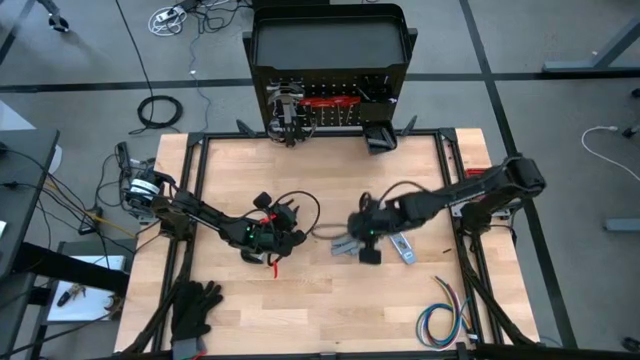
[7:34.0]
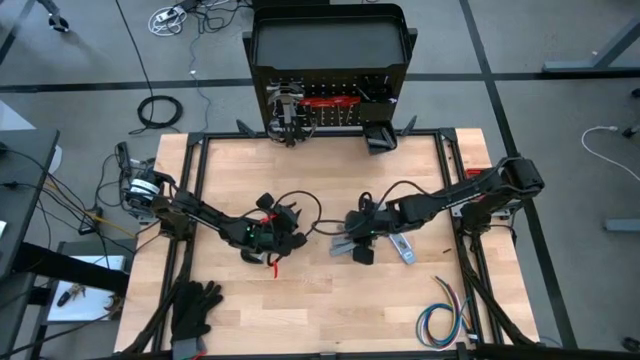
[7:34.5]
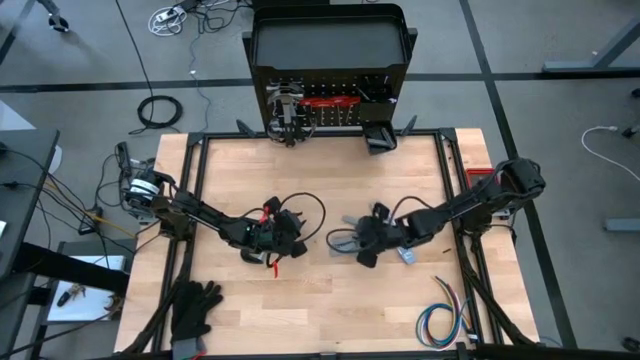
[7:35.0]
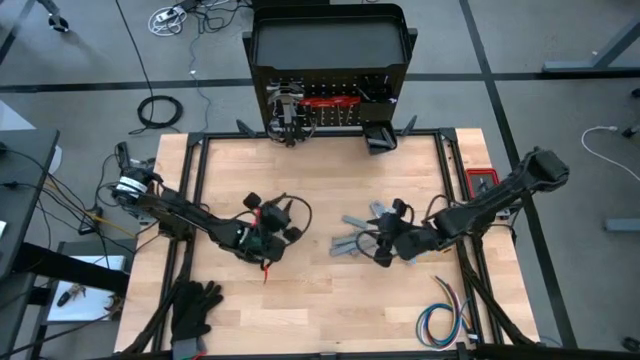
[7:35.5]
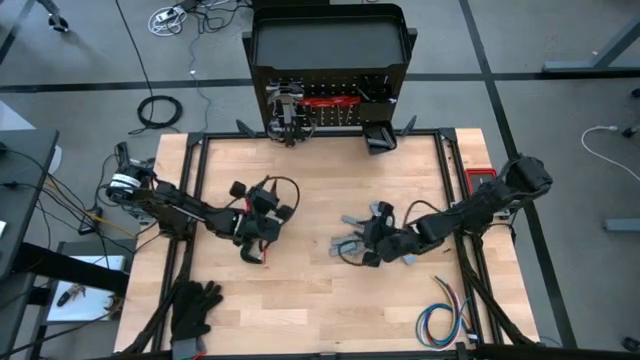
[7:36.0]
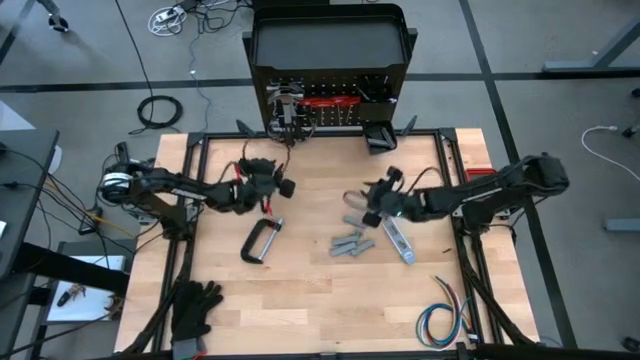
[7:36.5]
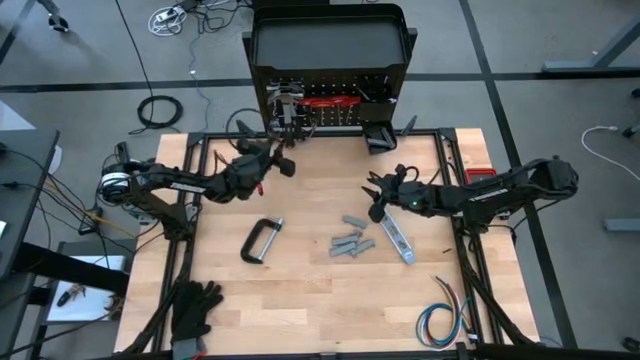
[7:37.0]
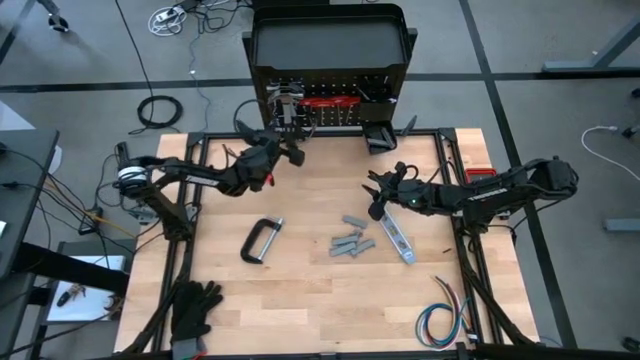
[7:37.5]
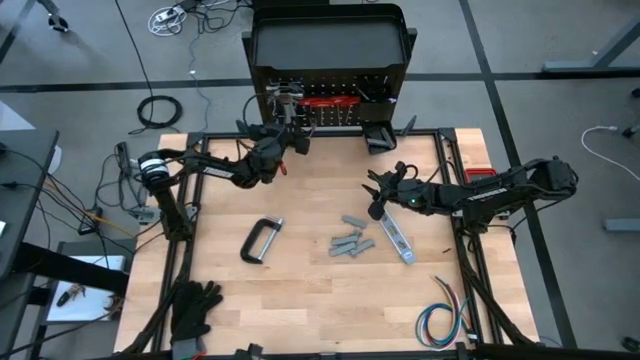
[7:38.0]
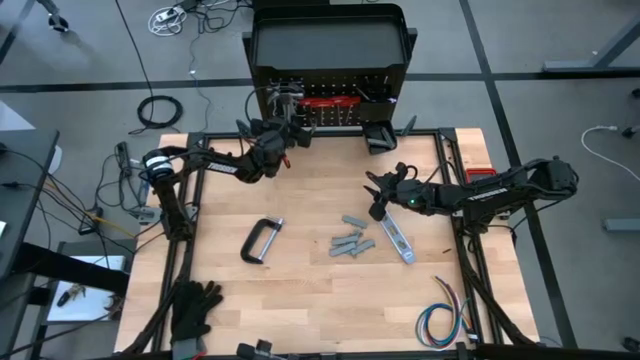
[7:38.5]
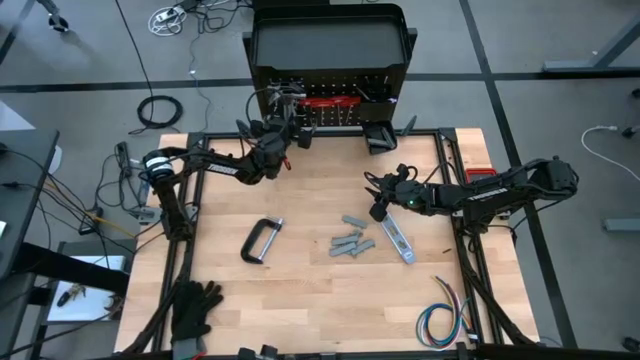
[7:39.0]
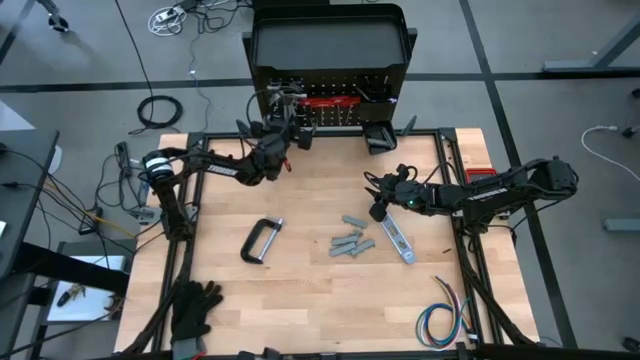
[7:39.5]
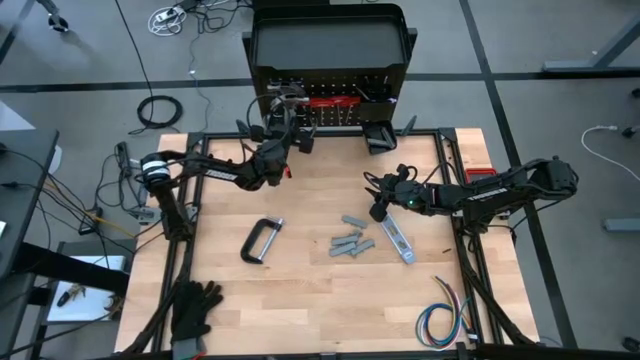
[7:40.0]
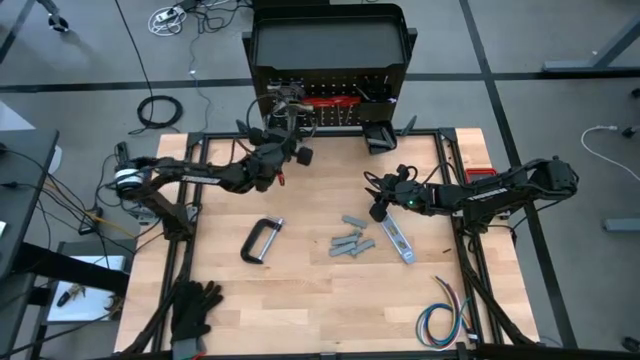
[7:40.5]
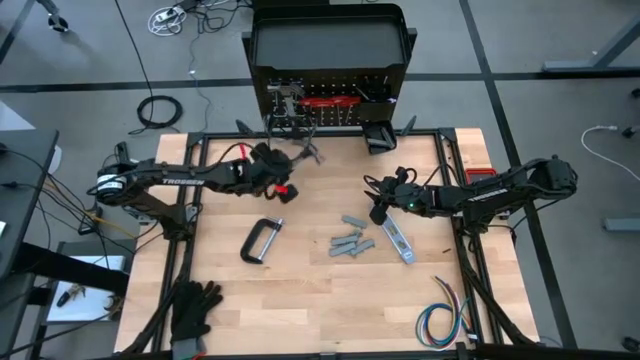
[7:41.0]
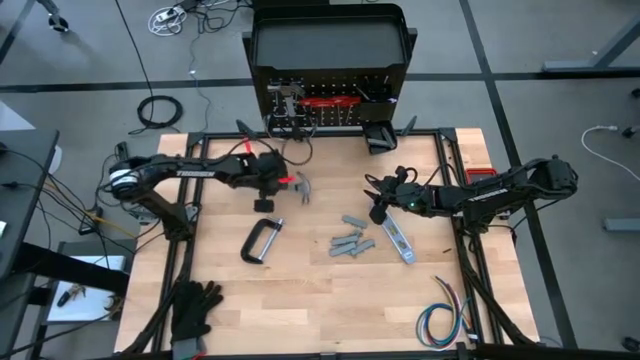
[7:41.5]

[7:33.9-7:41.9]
Task: Hang tools onto peg board
Unhang the hammer

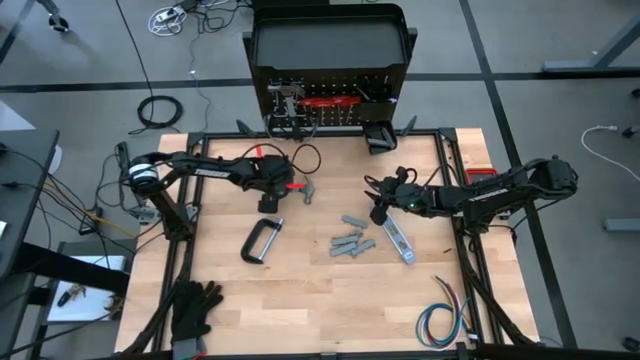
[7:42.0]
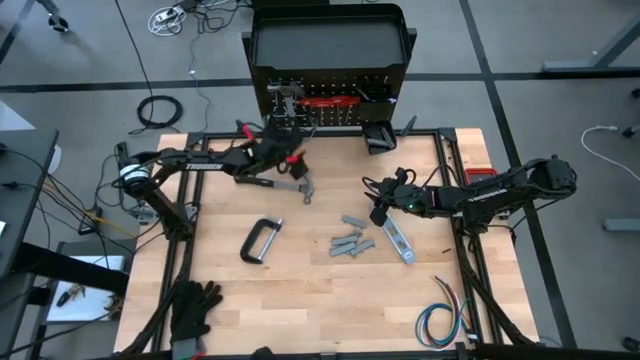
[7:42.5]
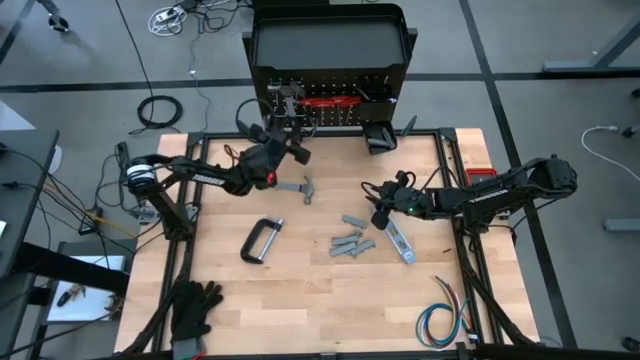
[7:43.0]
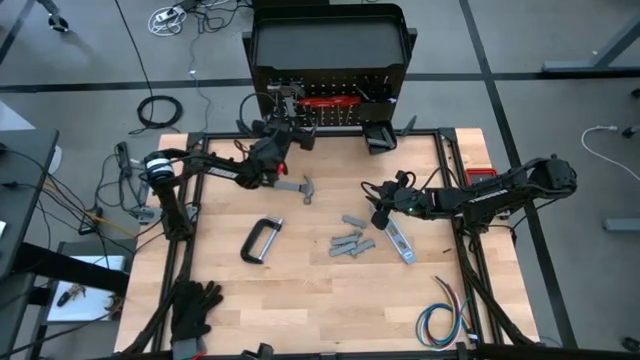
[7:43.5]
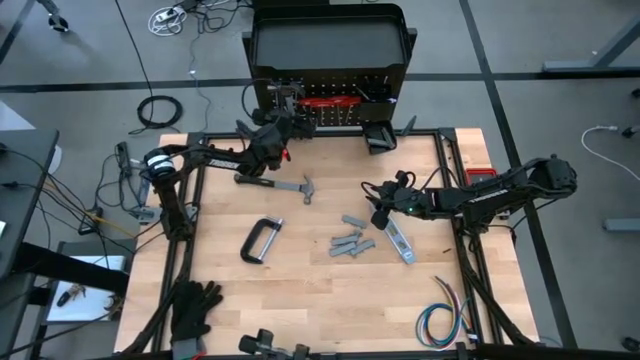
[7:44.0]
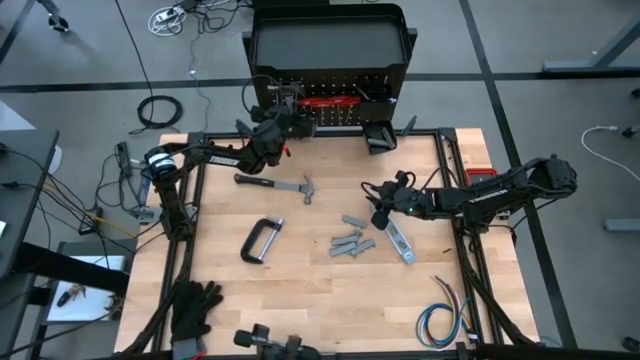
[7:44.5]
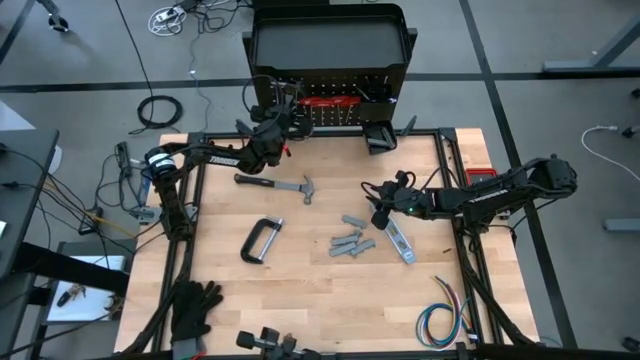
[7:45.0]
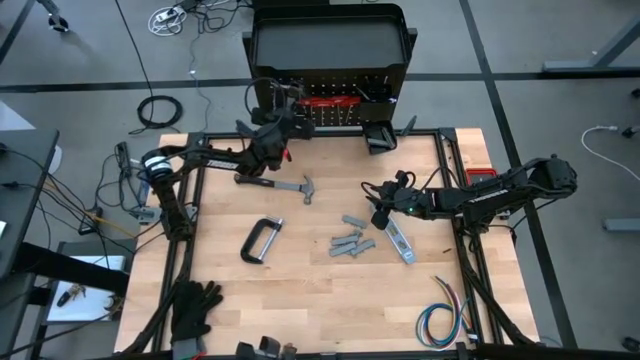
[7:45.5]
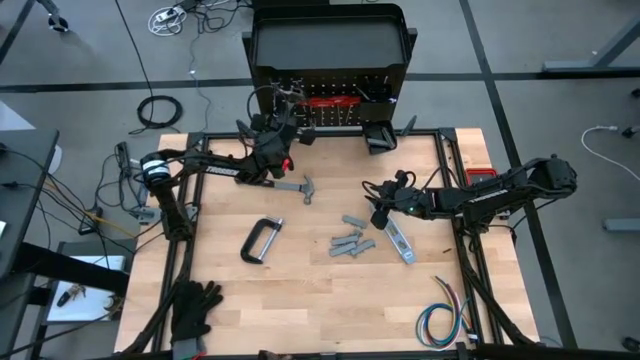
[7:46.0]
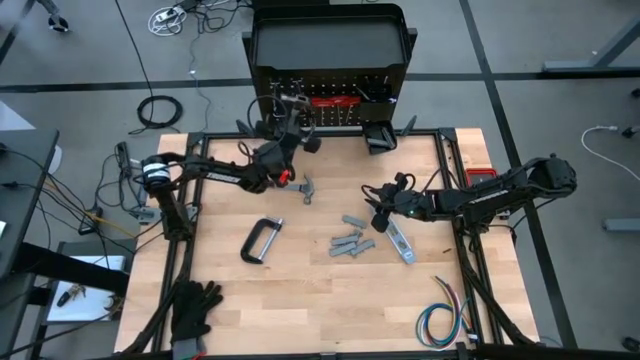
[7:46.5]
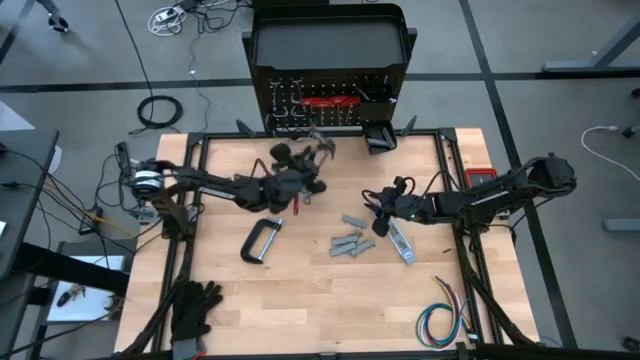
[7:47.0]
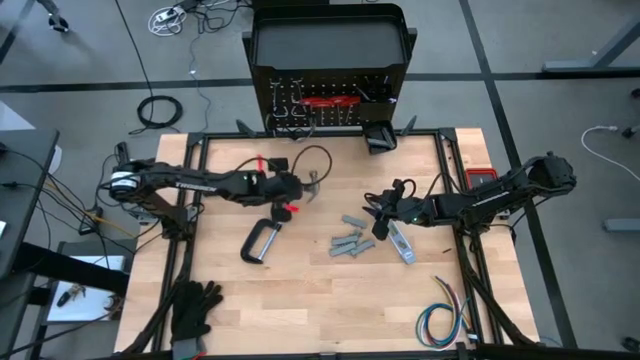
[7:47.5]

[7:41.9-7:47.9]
Unhang the hammer

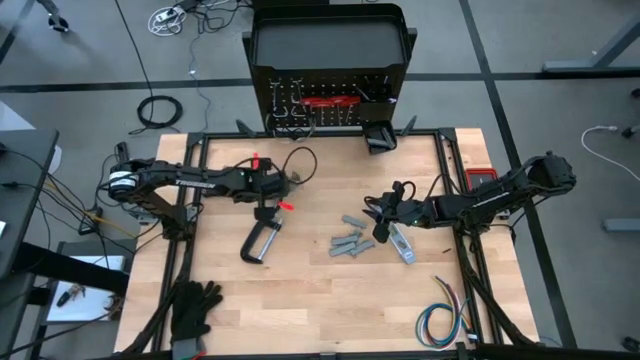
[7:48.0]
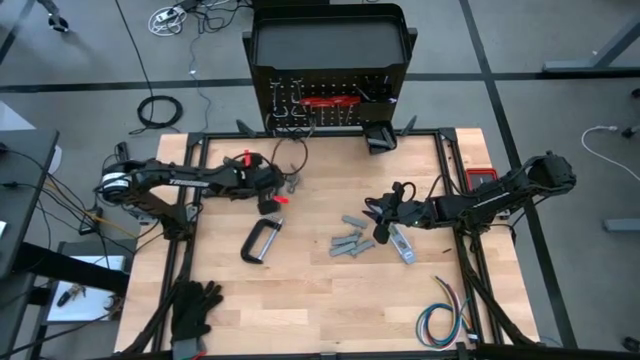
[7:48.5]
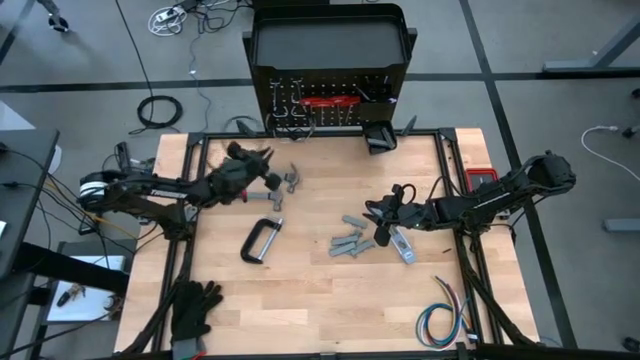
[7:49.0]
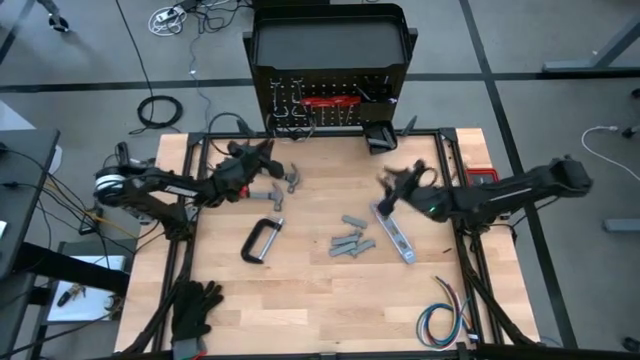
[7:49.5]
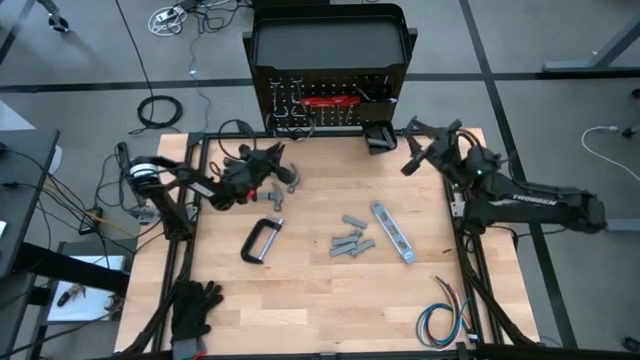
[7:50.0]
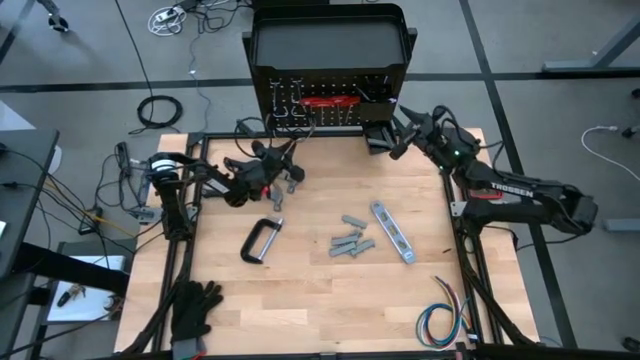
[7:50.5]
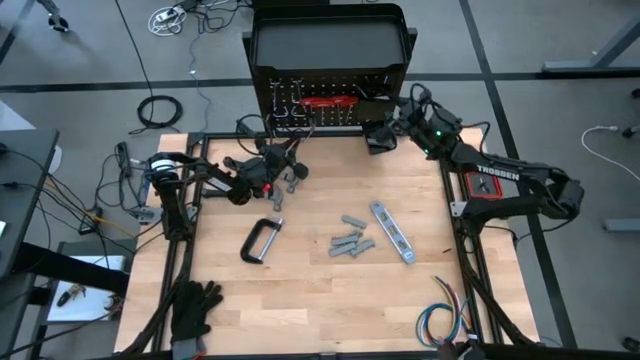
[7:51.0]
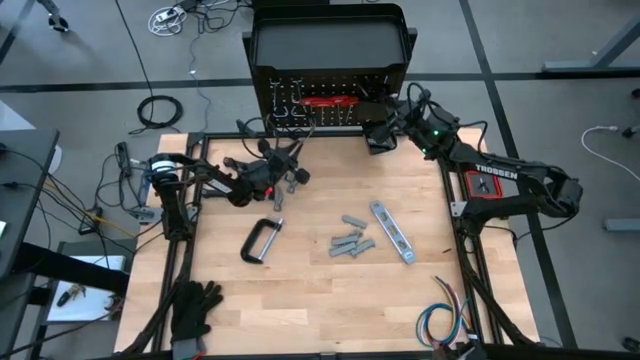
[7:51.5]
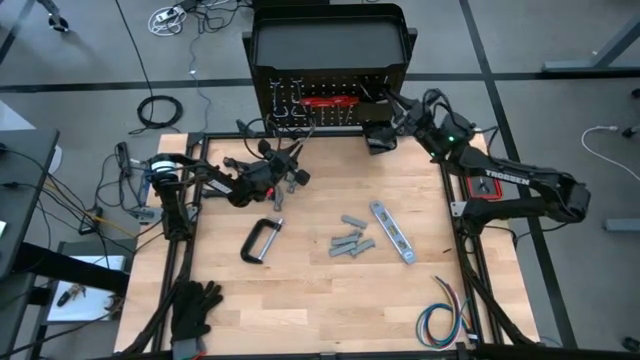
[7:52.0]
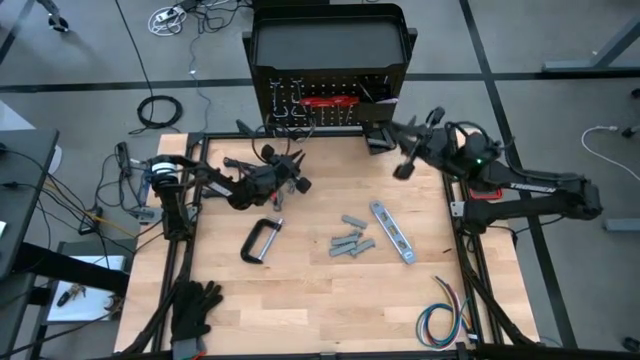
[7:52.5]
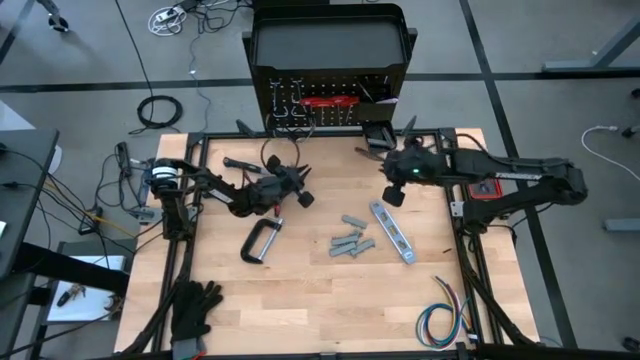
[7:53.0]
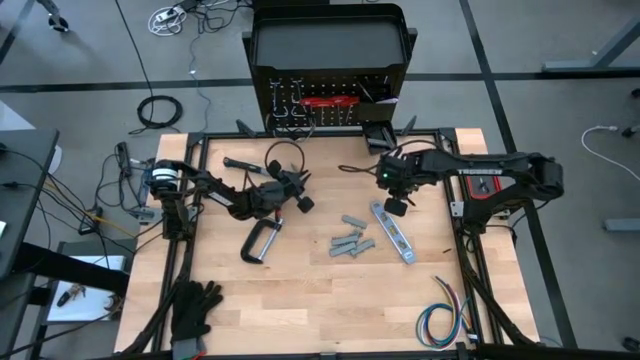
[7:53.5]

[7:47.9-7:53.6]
Put the black pen on the table

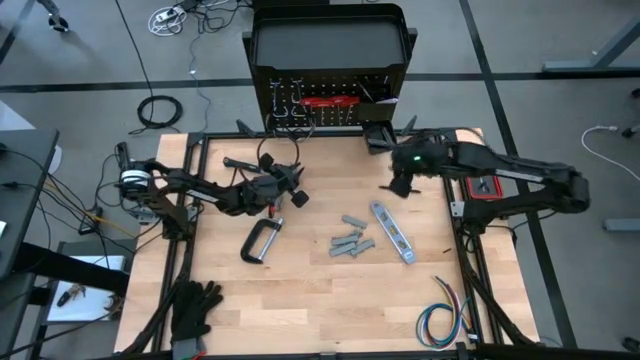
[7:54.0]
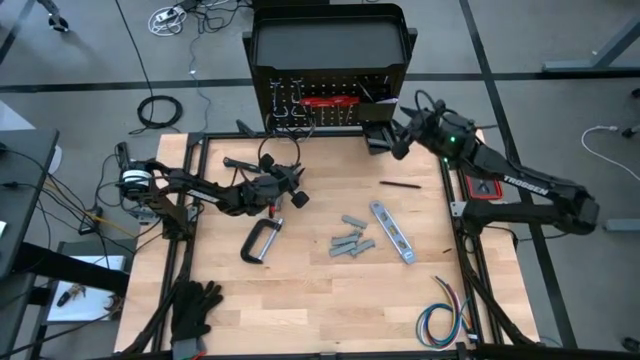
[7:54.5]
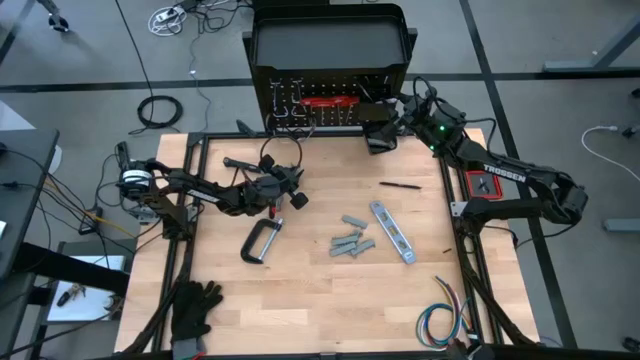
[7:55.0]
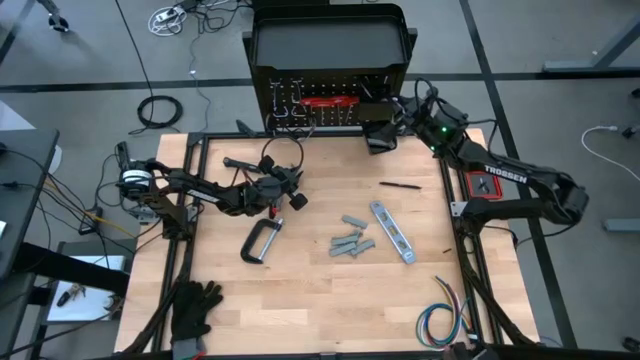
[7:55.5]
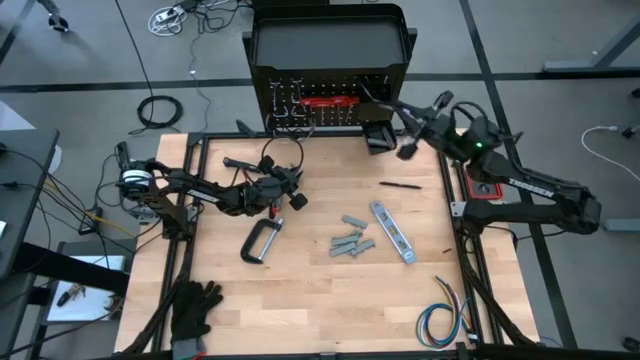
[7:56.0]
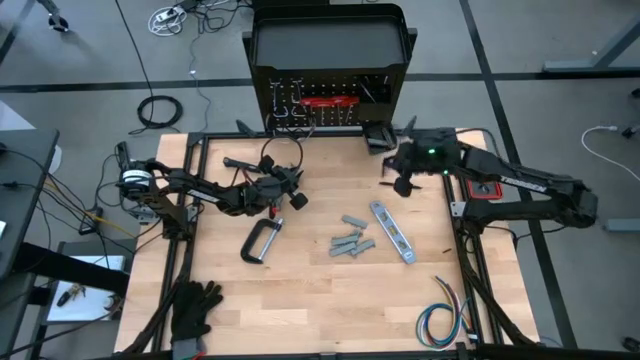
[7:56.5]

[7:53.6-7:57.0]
Put the pink pen on the table
